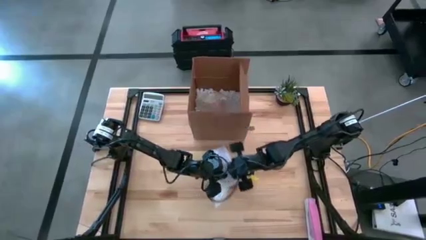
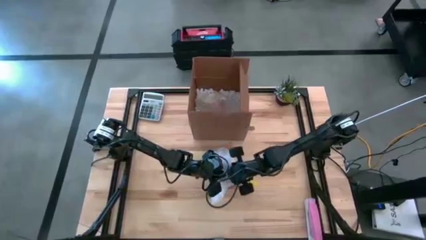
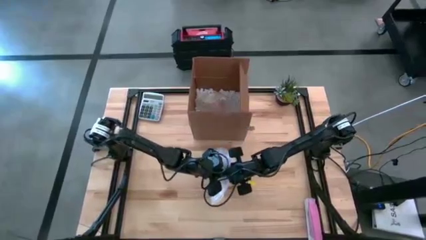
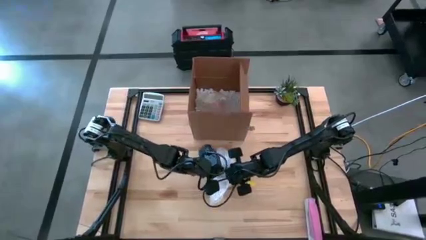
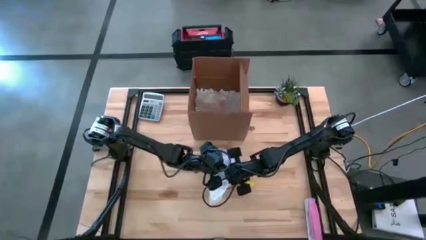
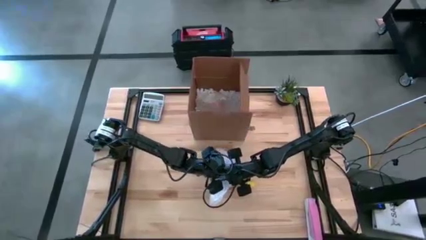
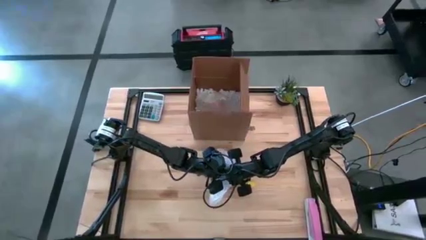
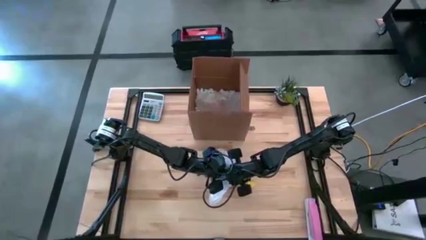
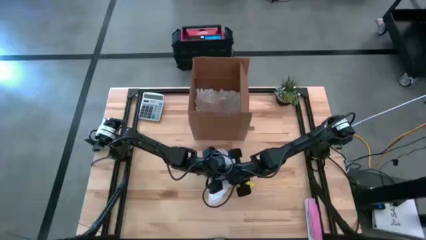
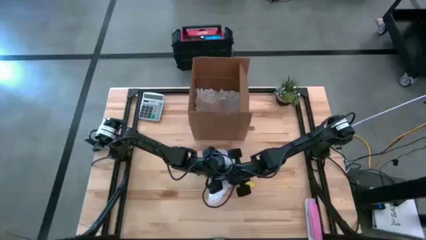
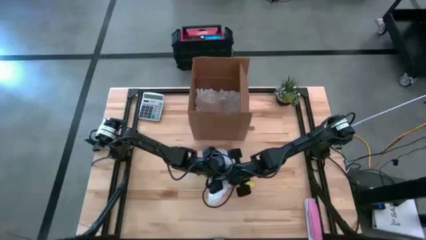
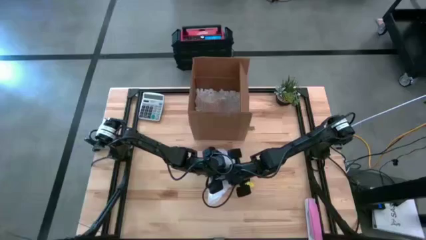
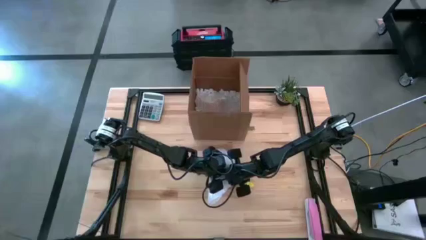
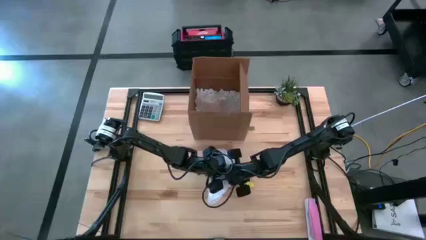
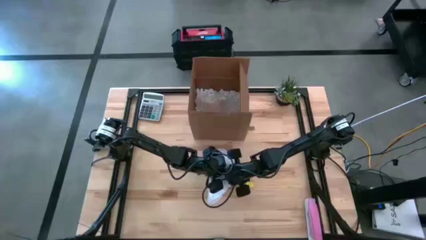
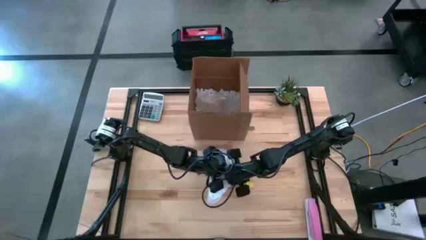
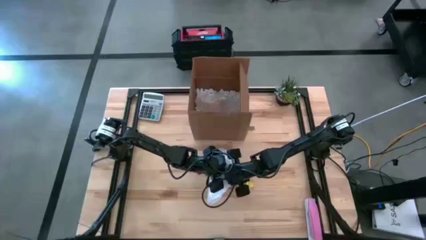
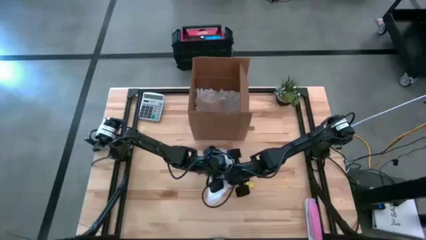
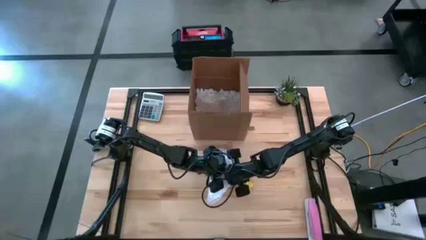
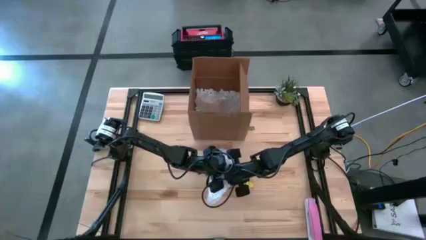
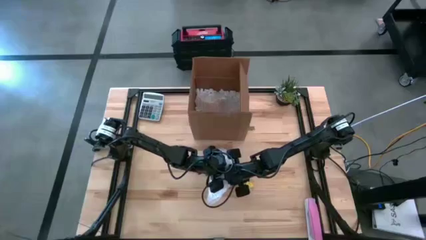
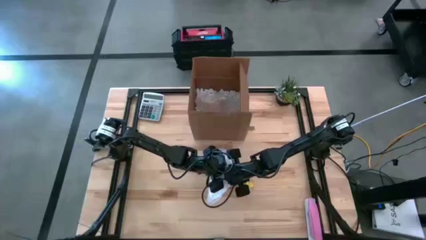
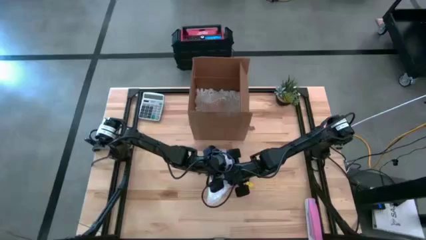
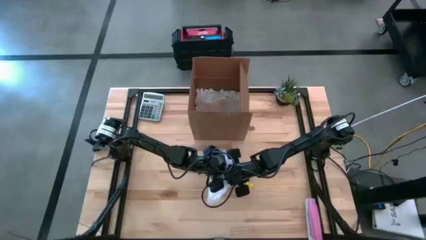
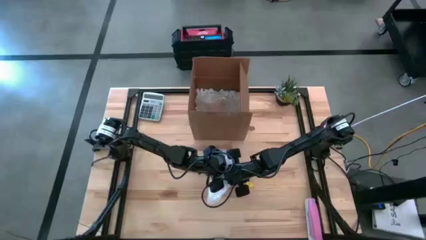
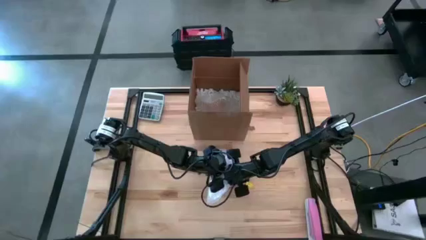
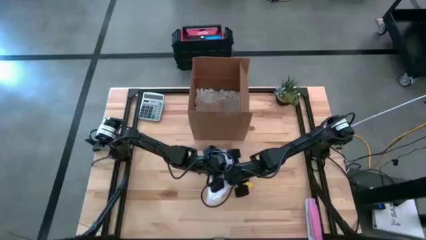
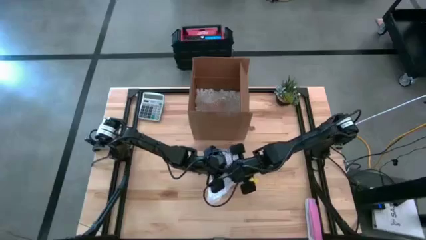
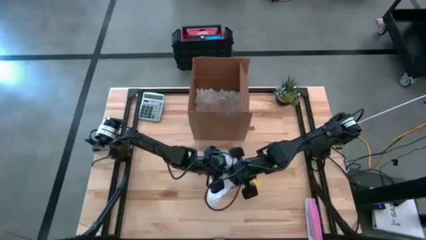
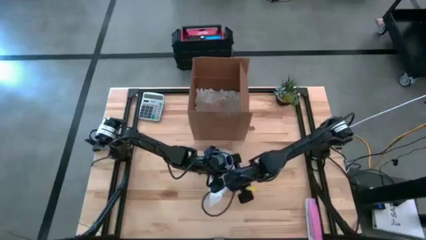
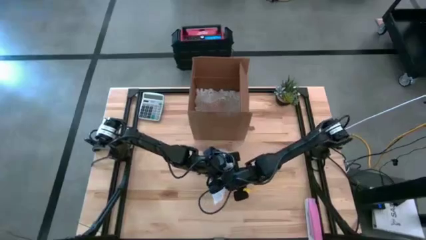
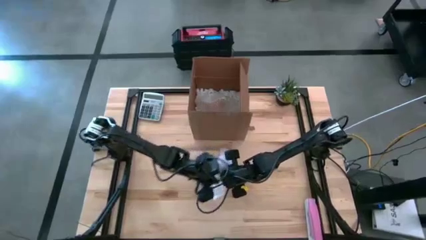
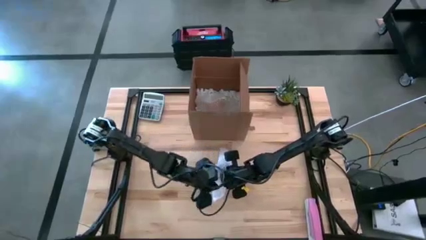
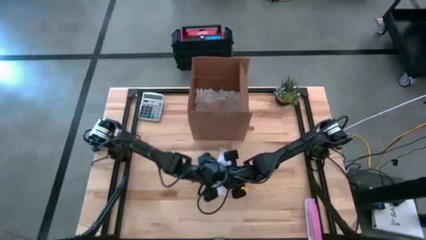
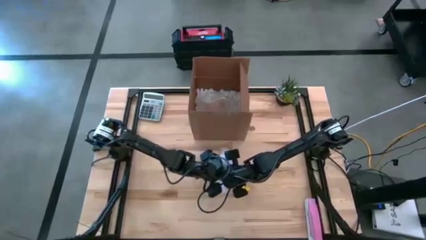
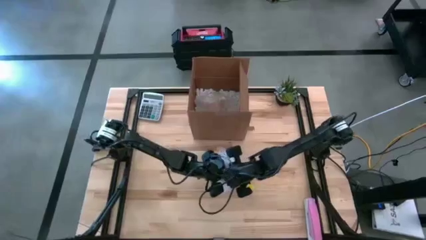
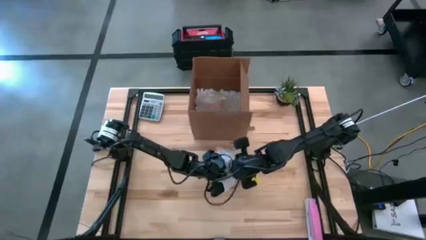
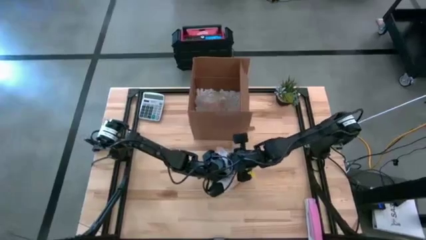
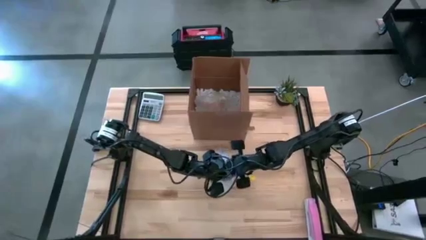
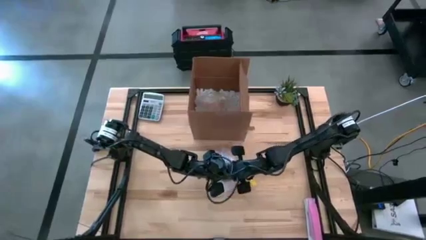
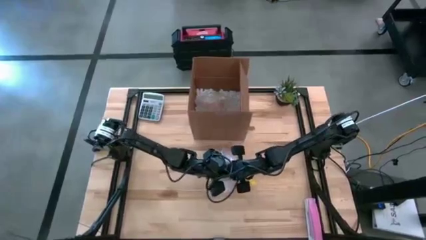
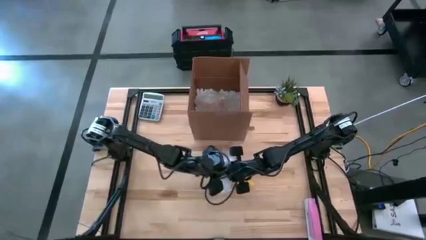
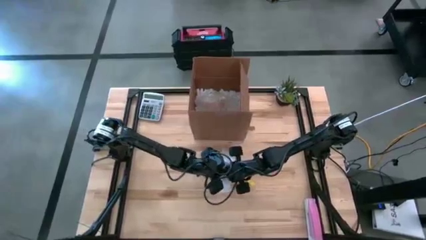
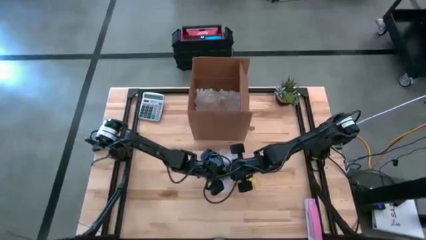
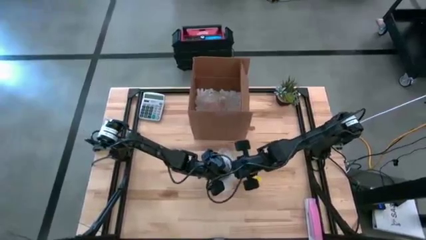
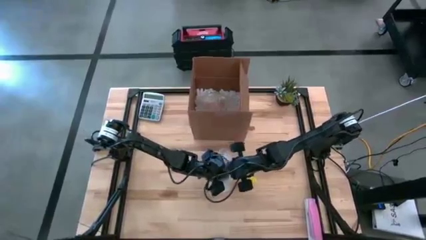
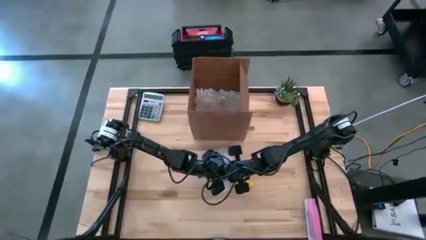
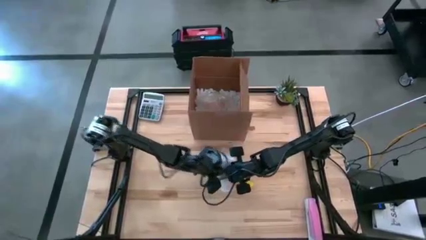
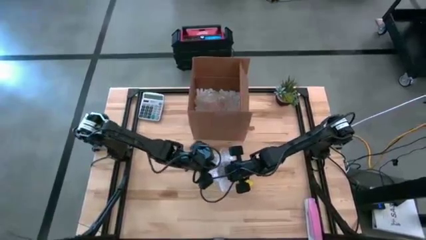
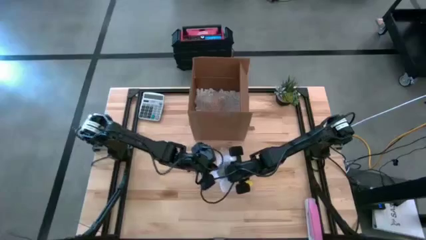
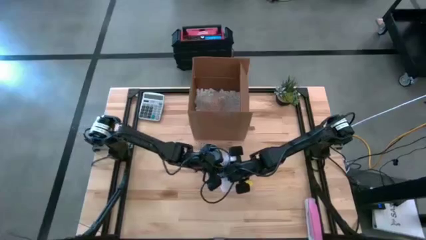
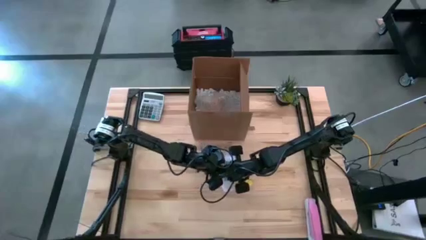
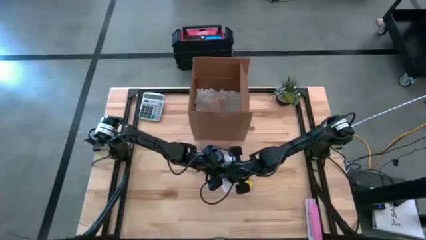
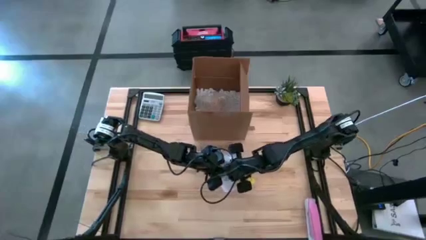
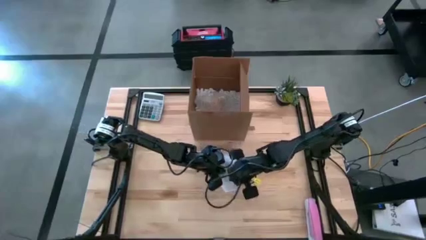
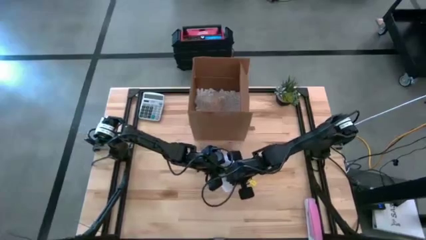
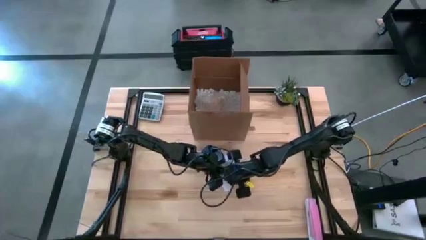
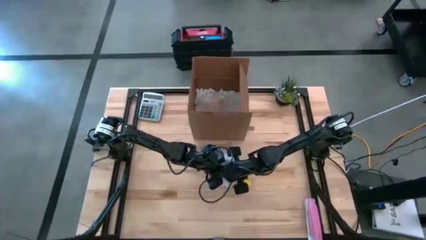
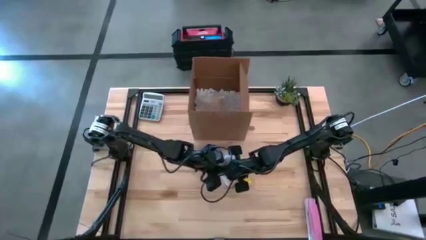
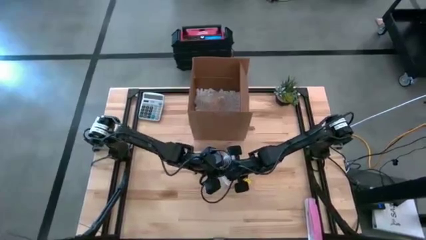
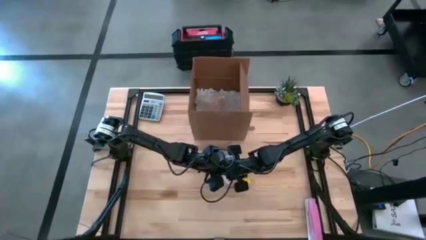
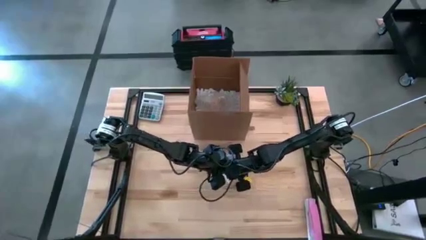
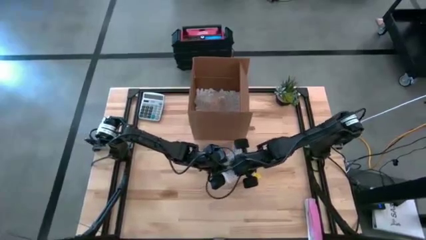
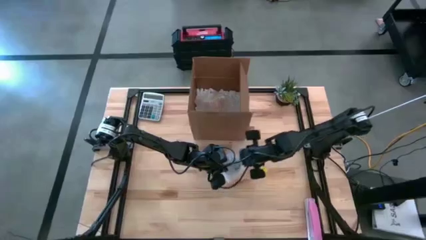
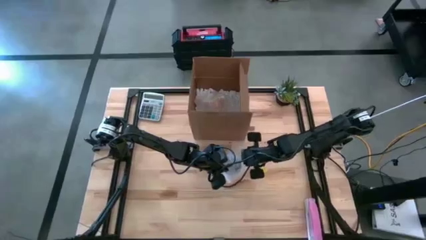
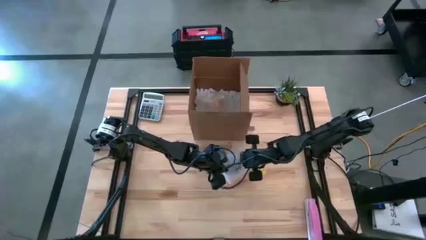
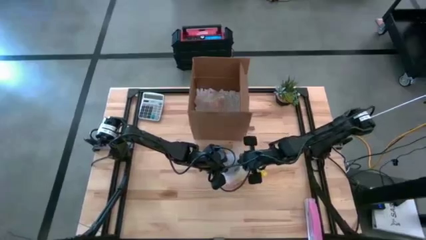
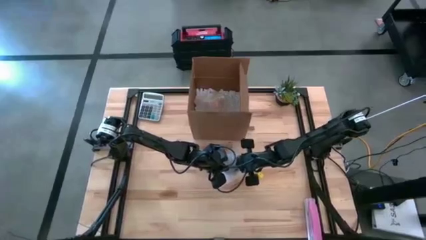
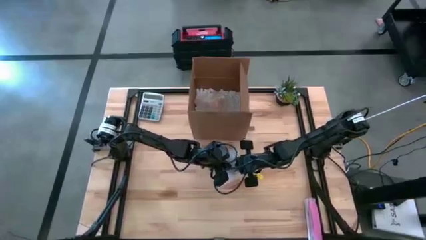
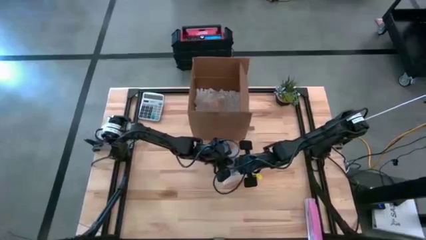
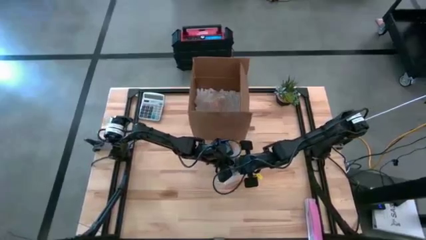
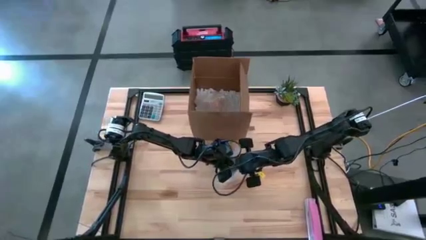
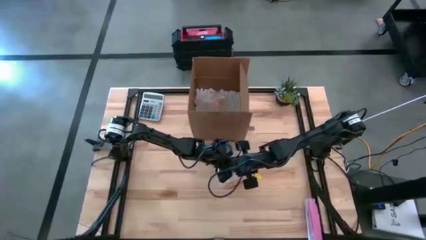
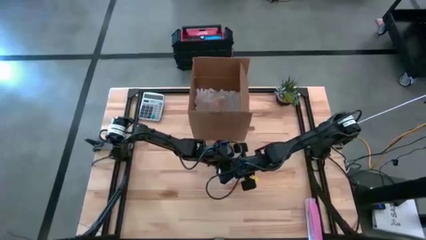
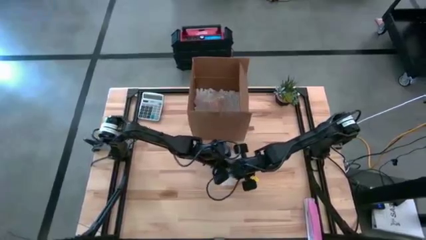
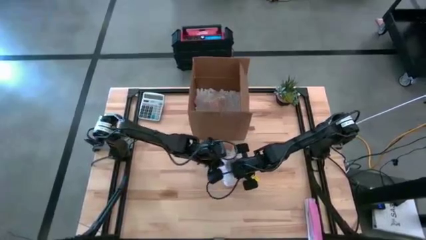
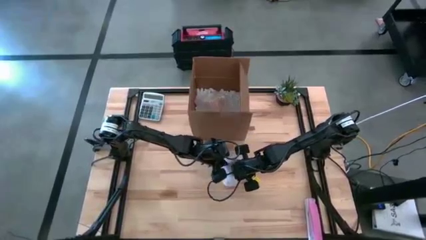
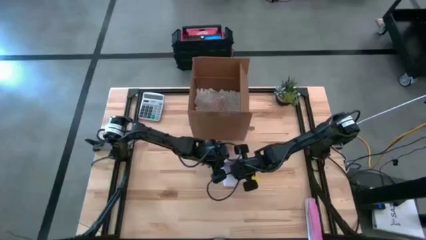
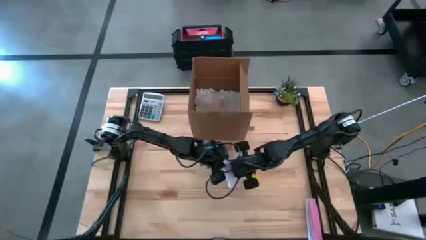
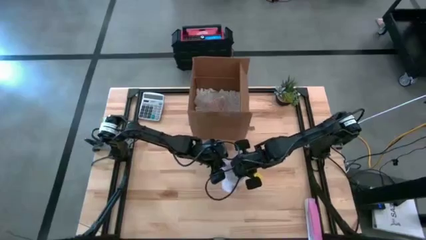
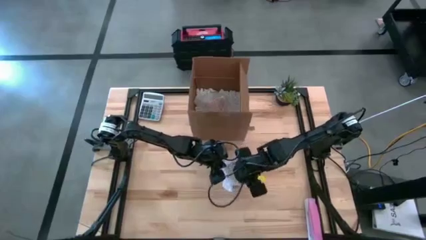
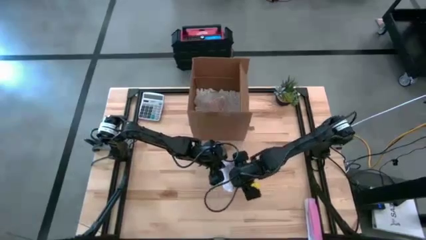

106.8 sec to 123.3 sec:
Task: wrap mug
Wrap the purple mug with bubble wrap

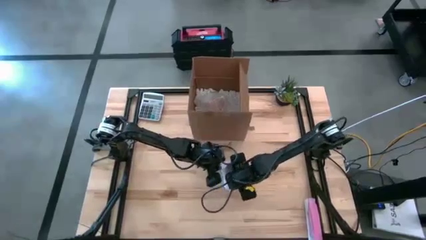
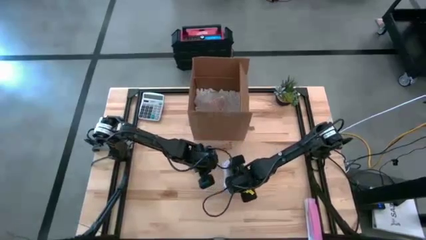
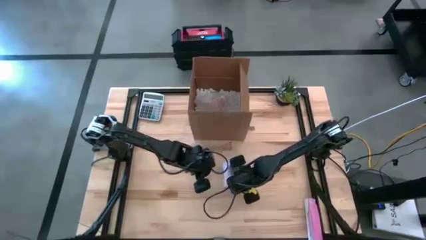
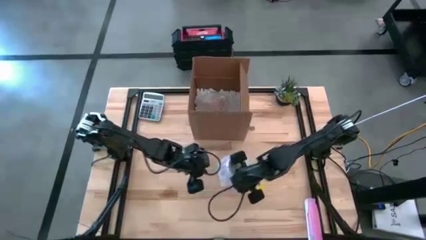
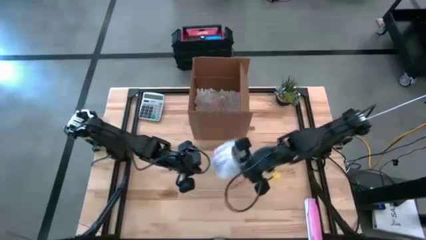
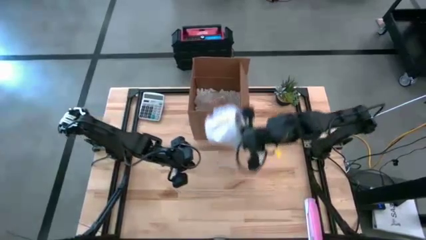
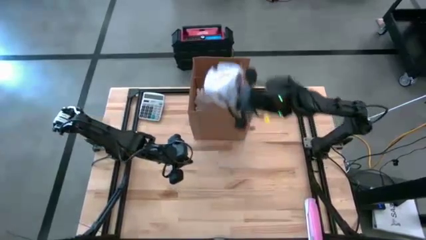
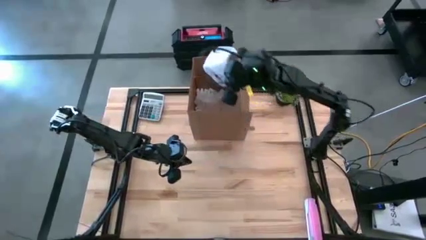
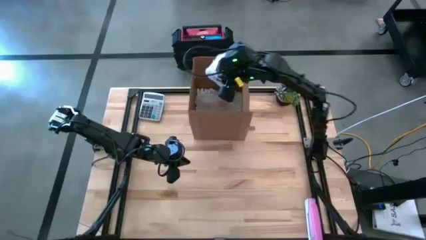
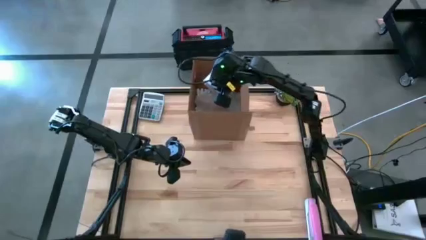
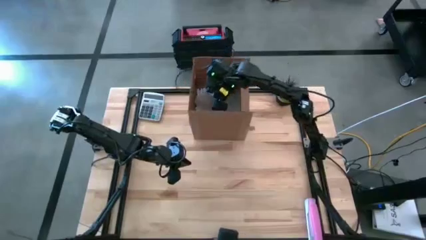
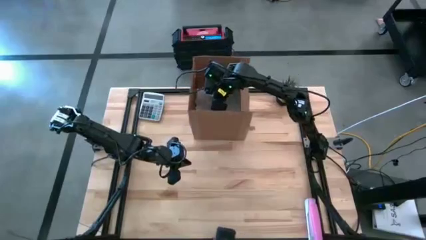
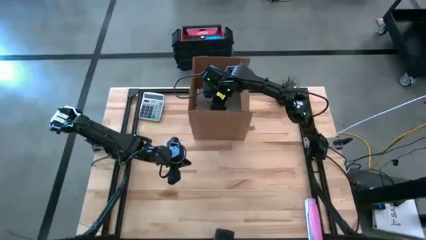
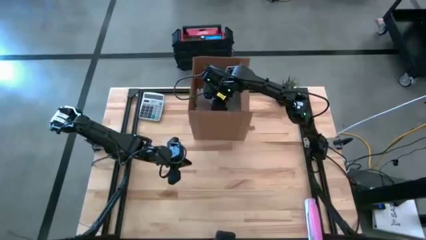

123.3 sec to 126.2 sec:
Put the wrapped purple mug into the box
